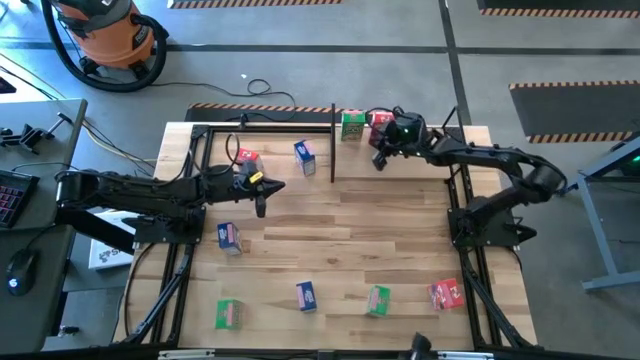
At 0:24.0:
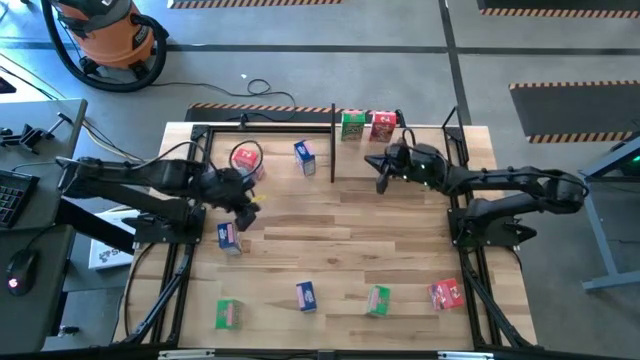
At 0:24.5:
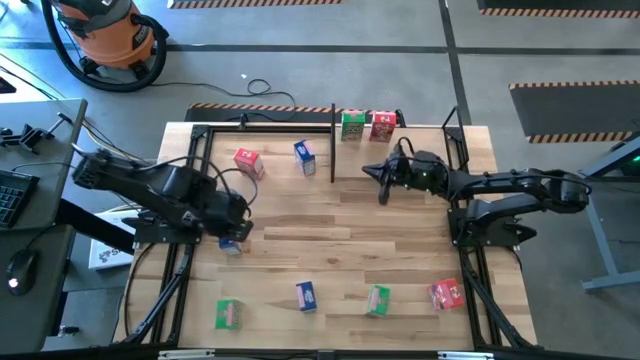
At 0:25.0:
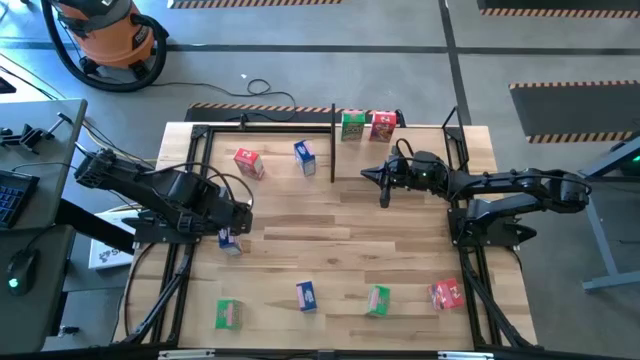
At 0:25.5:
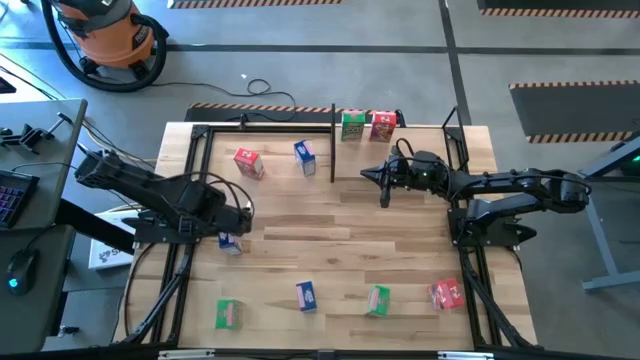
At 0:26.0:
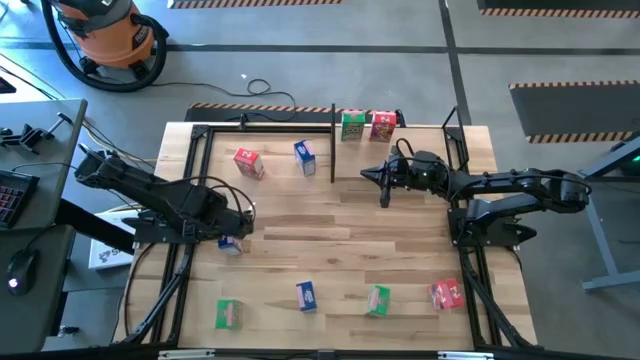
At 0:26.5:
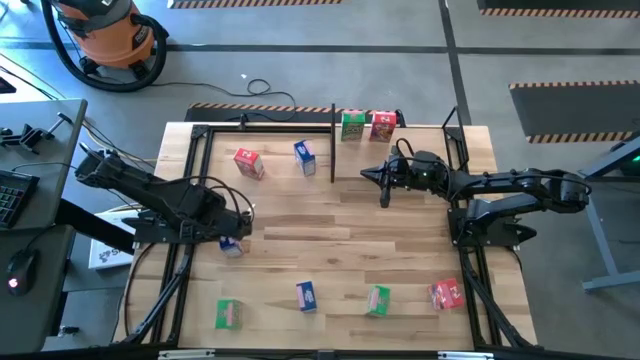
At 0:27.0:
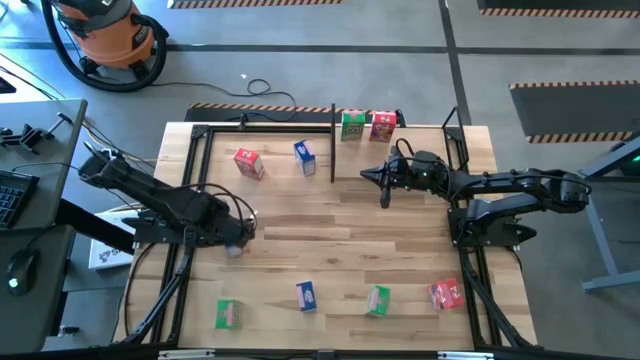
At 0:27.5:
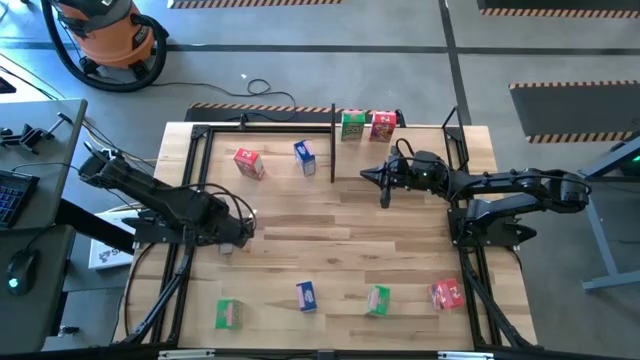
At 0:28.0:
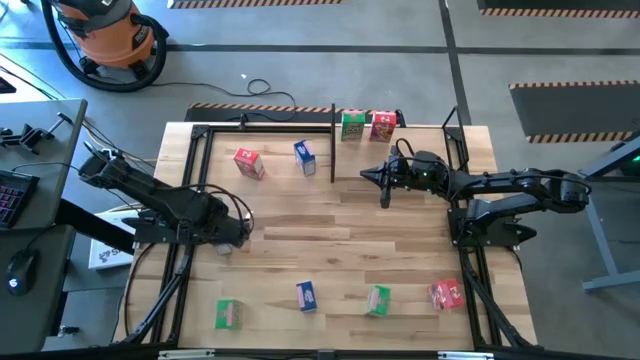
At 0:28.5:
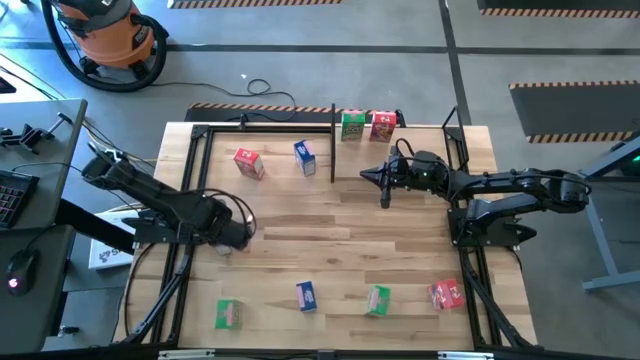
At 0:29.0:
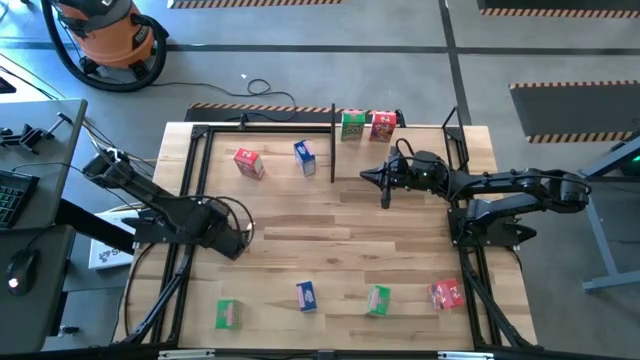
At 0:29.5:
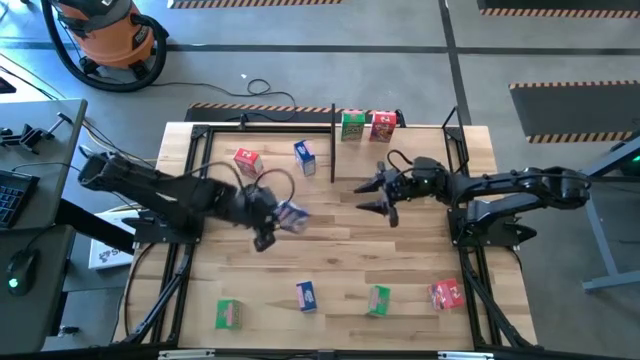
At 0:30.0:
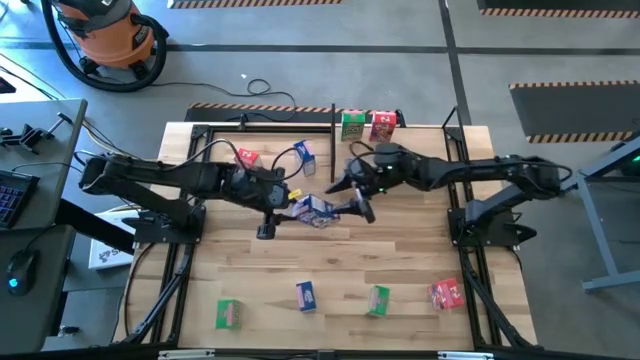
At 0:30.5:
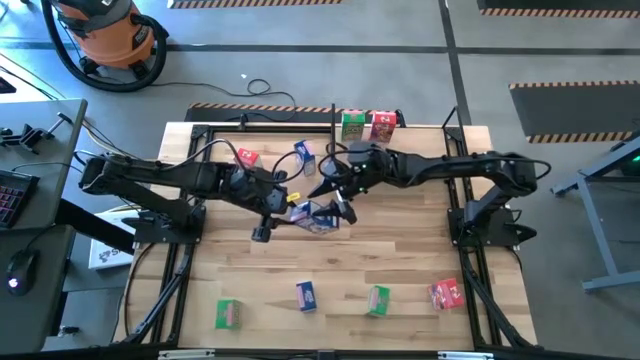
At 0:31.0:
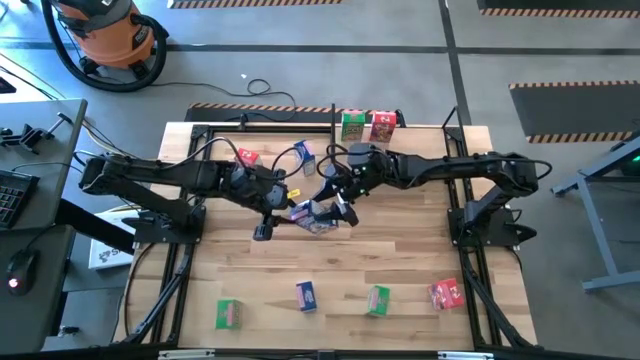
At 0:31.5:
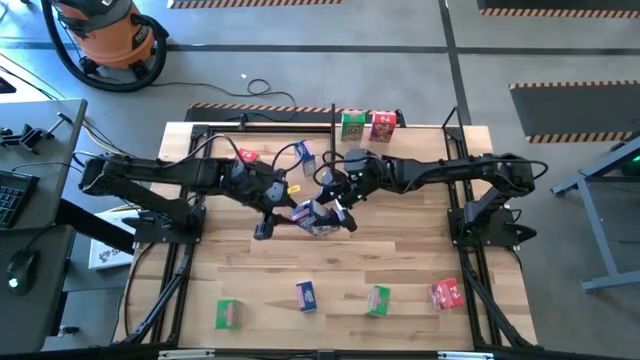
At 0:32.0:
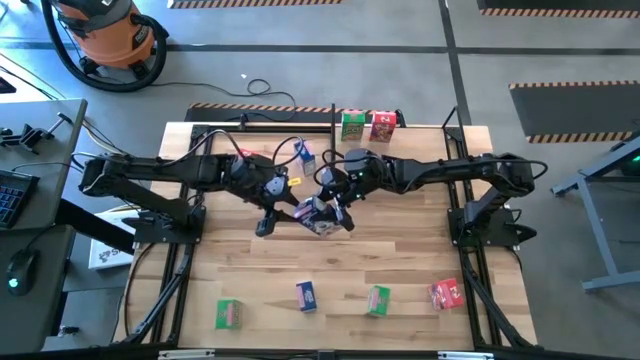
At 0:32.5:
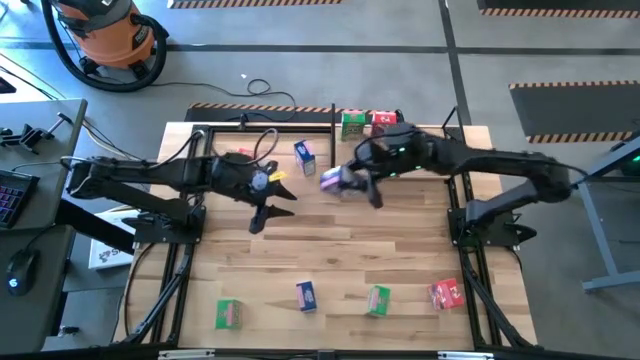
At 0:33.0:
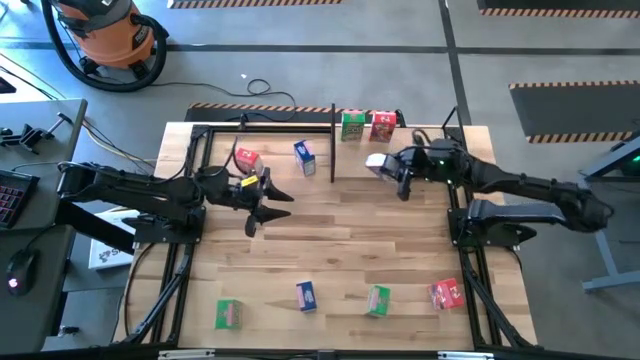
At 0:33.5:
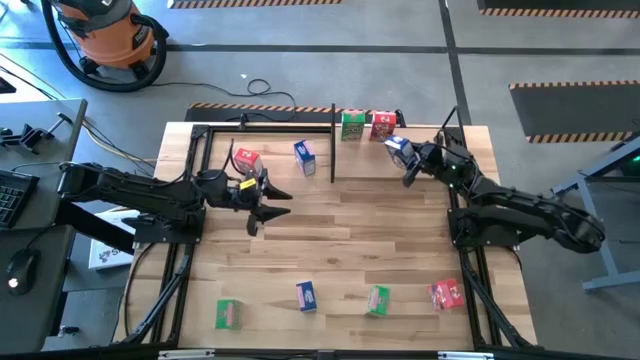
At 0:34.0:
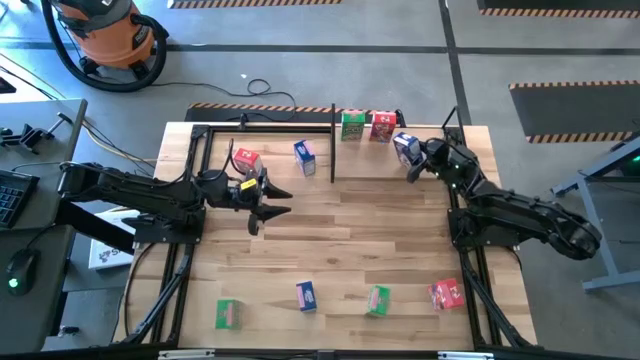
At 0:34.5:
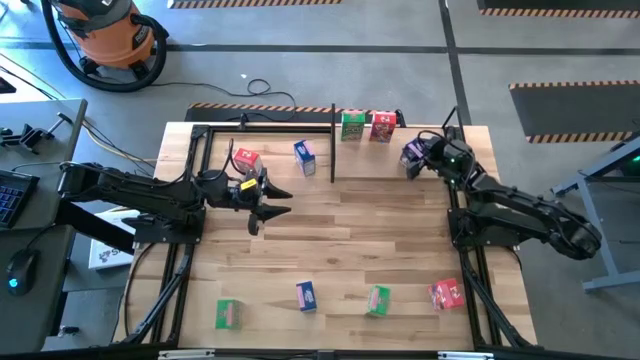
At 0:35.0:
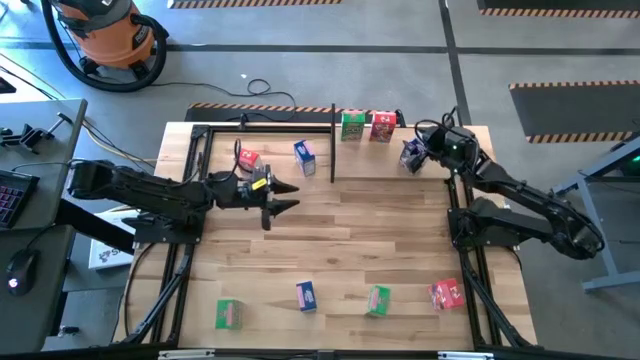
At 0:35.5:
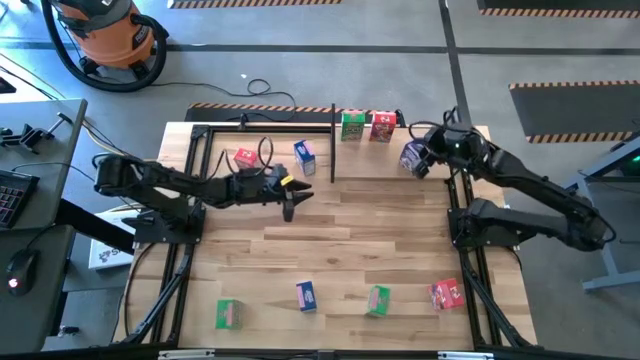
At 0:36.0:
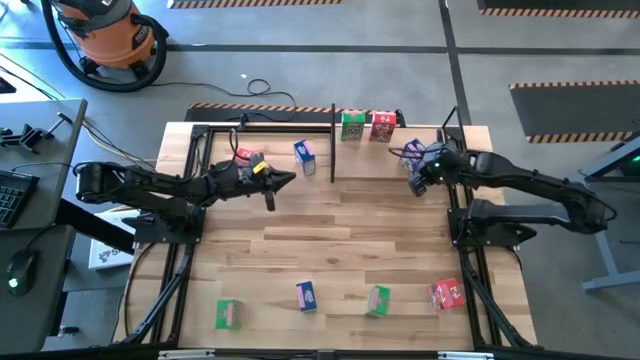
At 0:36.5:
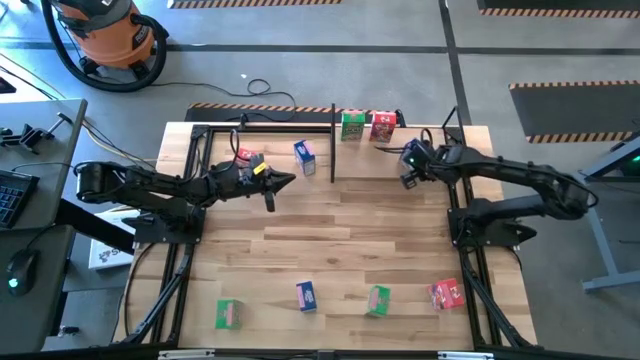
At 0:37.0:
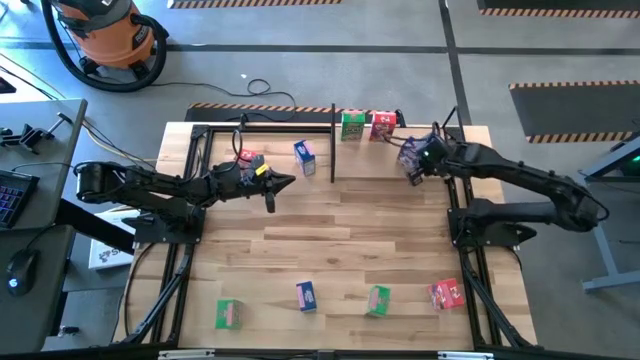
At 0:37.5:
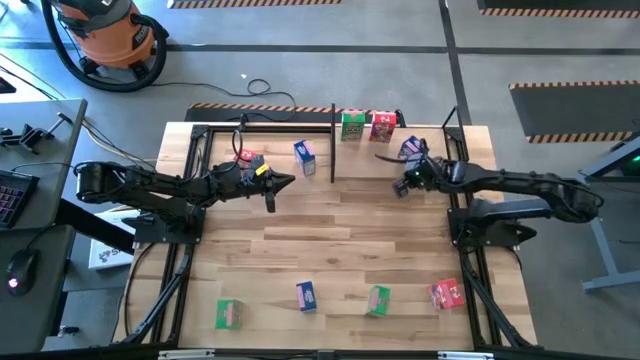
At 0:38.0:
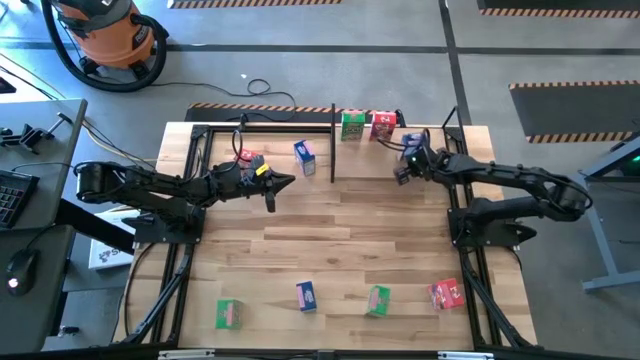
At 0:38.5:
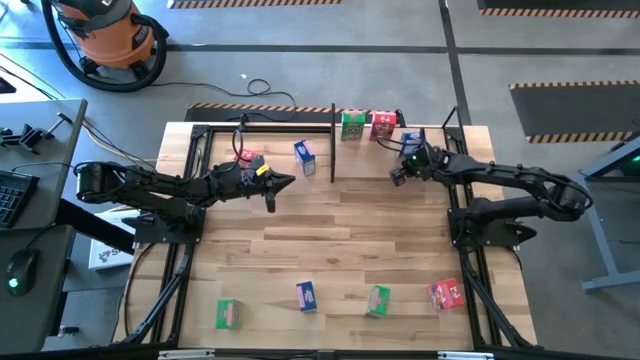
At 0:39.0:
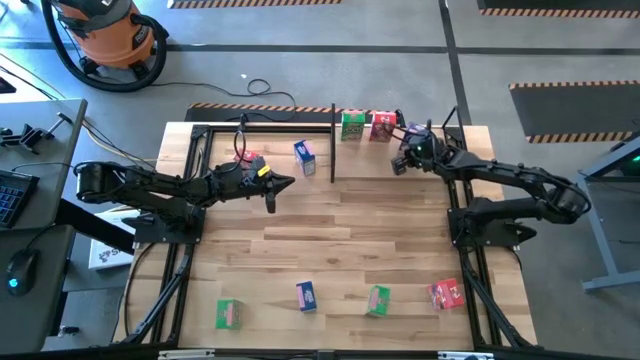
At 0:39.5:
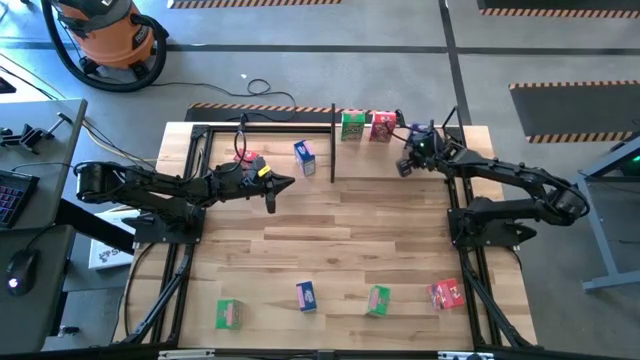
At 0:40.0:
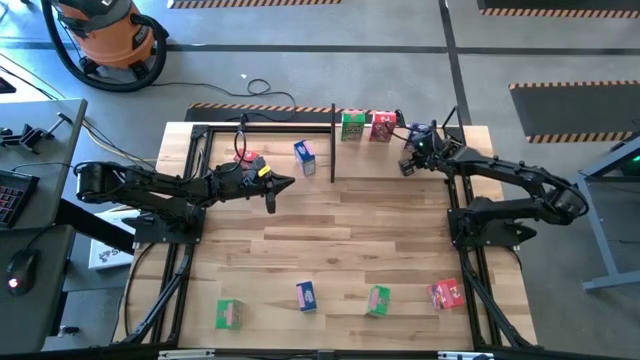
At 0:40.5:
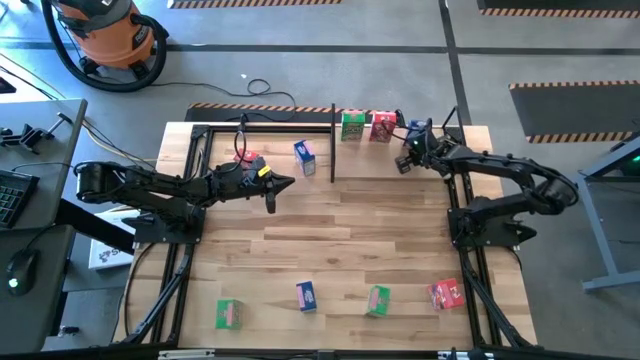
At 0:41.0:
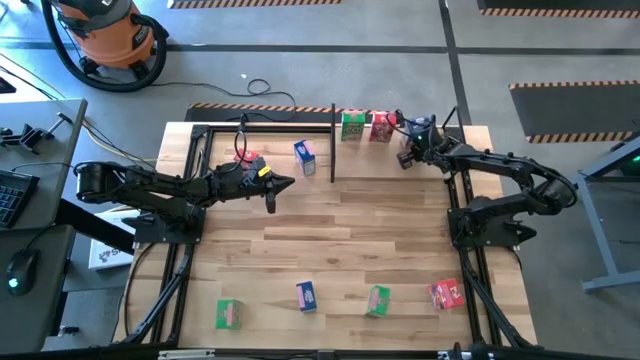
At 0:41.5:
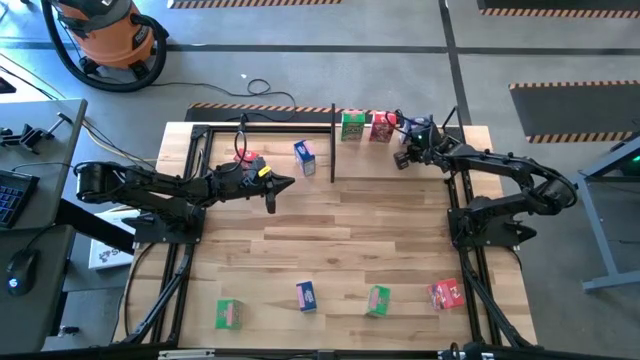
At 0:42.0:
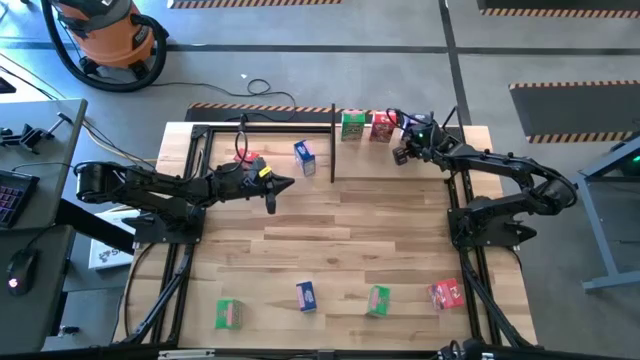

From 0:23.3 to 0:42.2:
Task: Stack cereal on shelf
Put the middle left blue cereal box on the shelf

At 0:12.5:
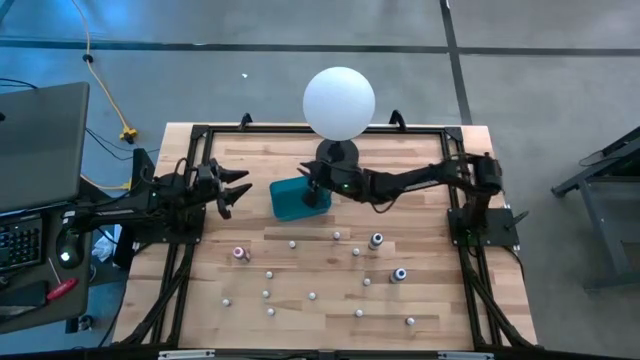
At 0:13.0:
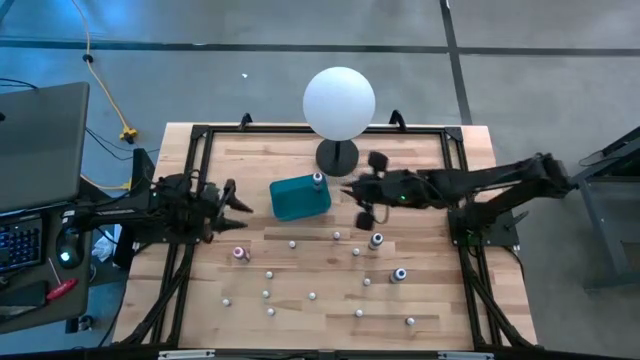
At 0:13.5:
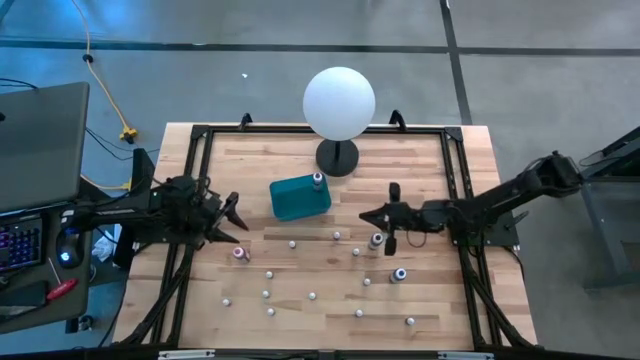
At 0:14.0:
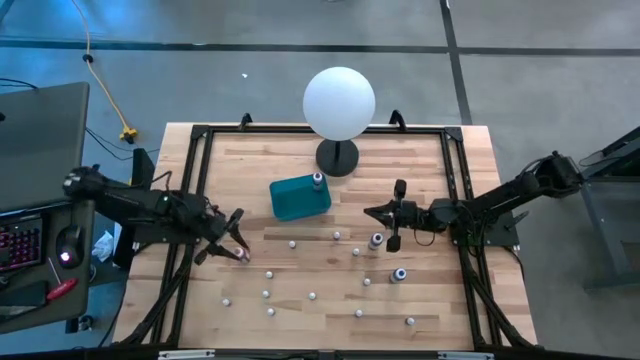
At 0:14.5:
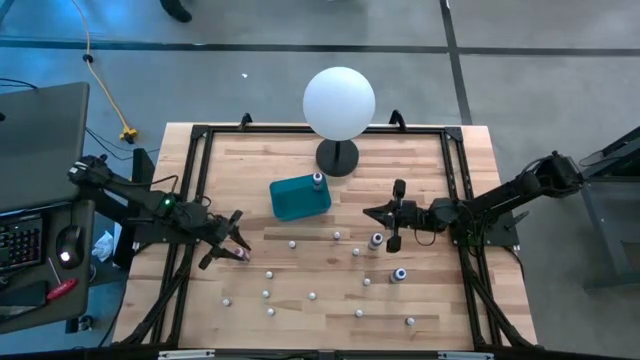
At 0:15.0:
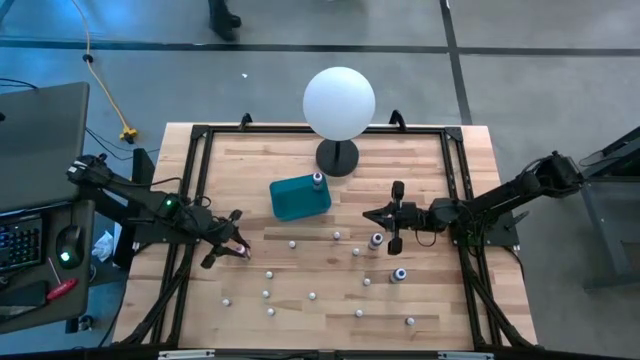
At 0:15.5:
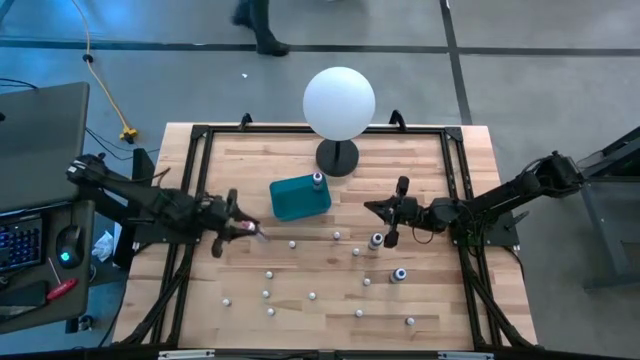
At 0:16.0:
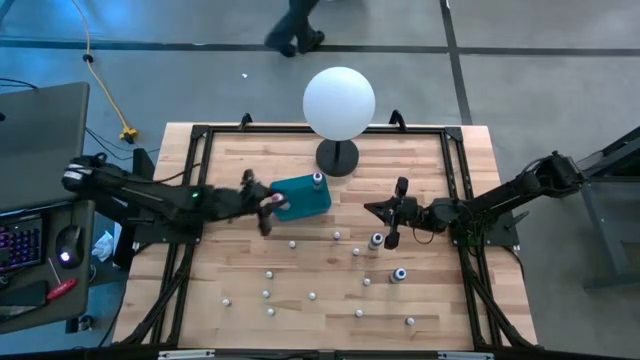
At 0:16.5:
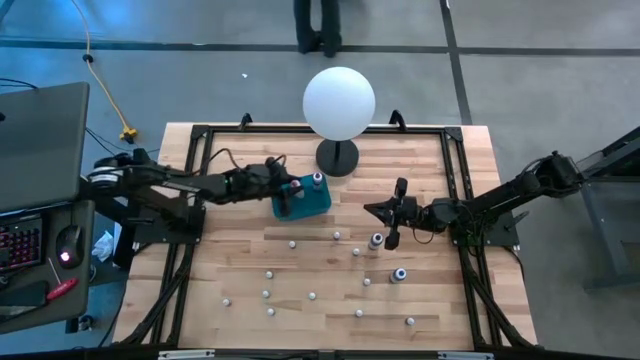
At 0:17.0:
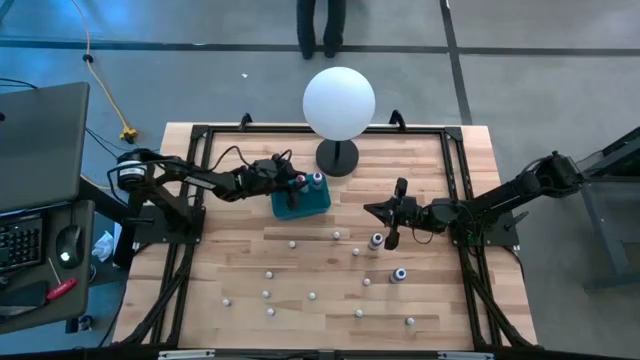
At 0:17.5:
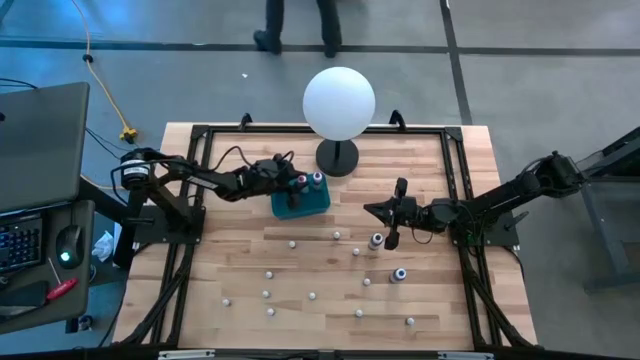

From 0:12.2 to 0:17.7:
Task: Pick & Place food coloring
Put the large pink food coloring bottle into the blue bin
